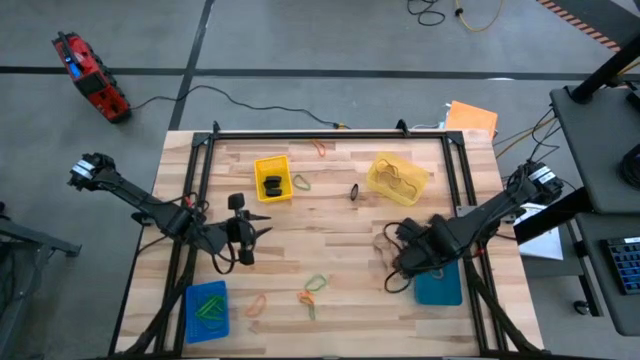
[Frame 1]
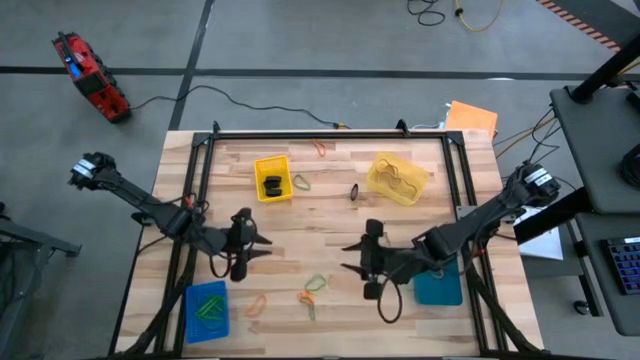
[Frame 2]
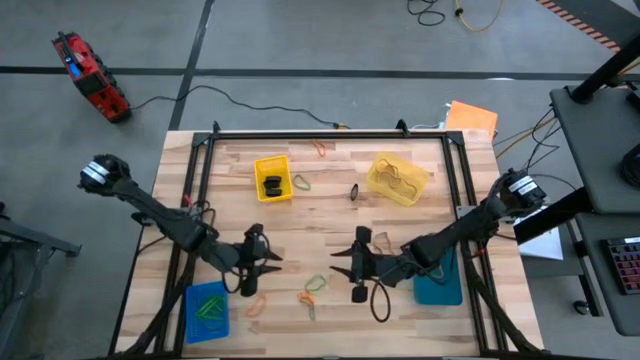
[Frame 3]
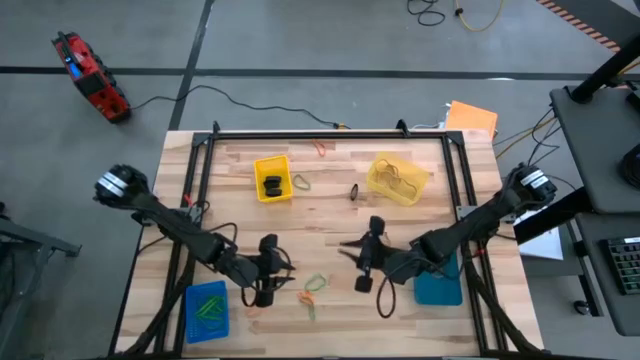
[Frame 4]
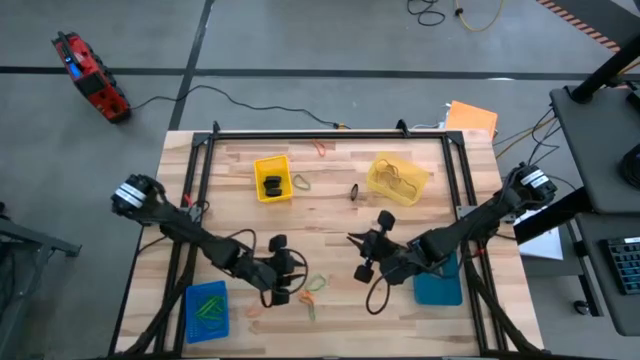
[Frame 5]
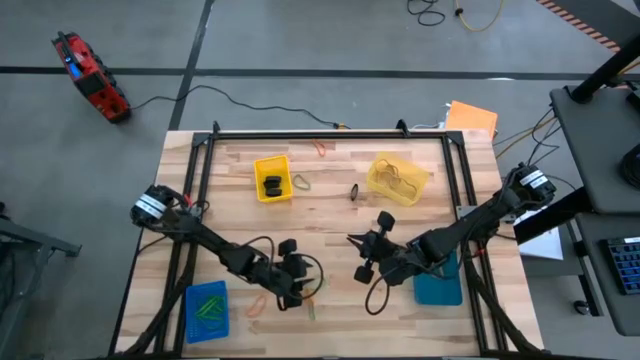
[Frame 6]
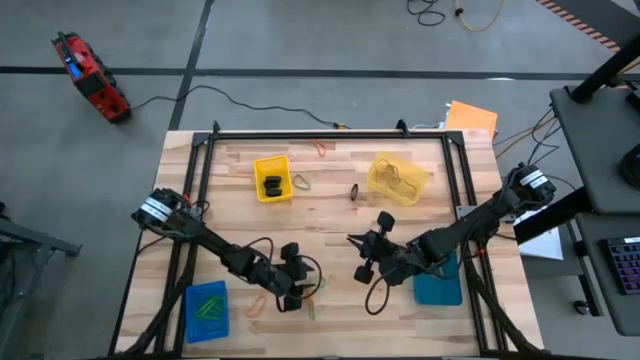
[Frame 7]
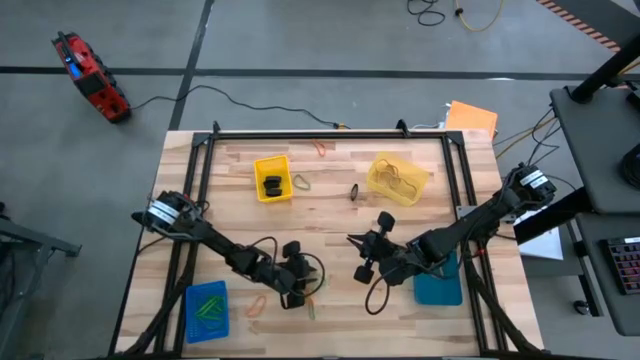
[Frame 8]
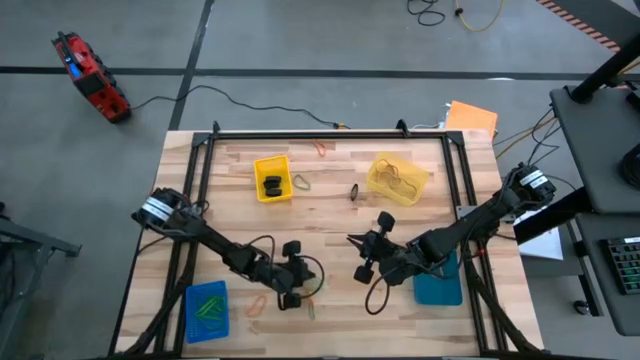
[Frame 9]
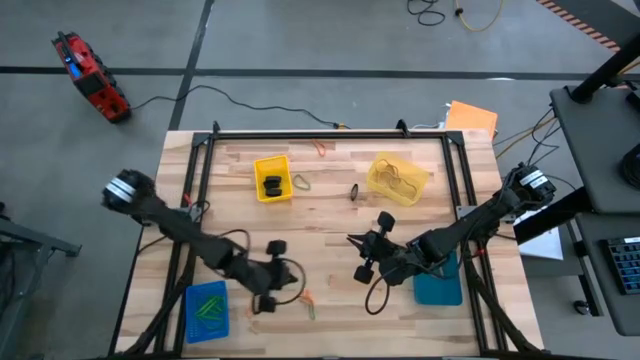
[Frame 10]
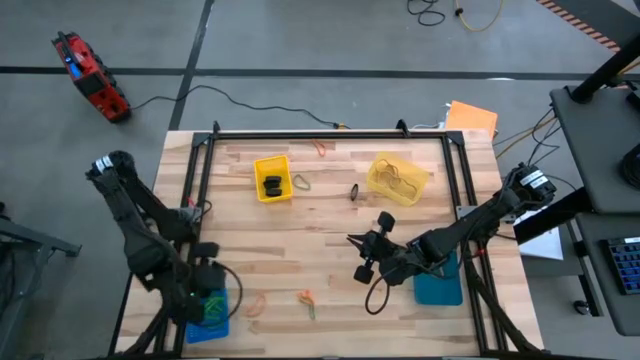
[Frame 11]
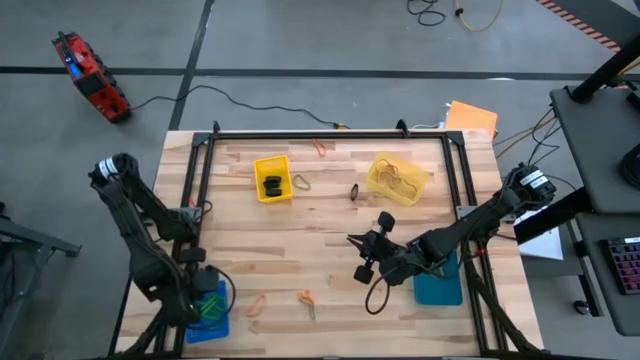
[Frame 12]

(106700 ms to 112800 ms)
Task: Sort rubber bands into baskets
Put the green rubber band into the left blue bin

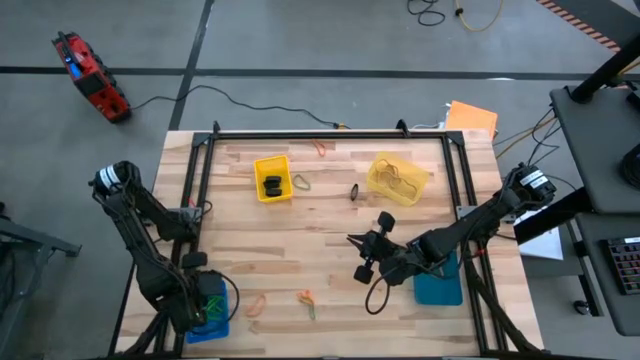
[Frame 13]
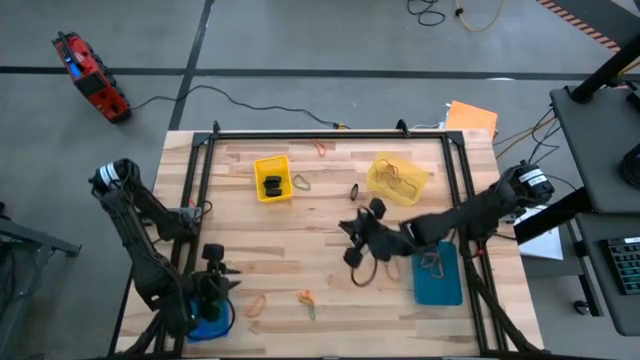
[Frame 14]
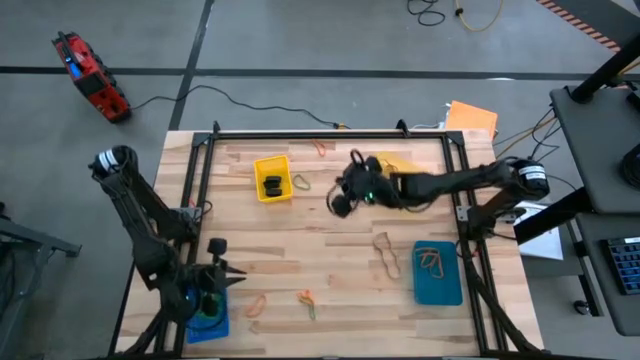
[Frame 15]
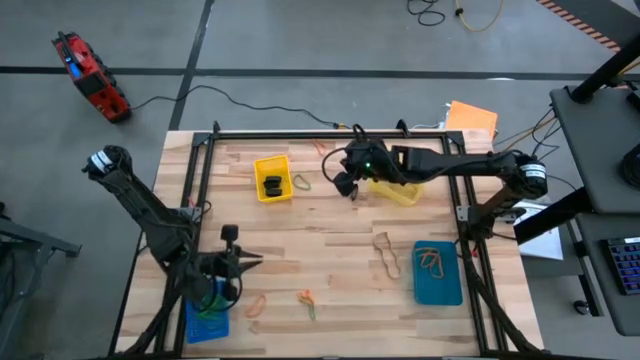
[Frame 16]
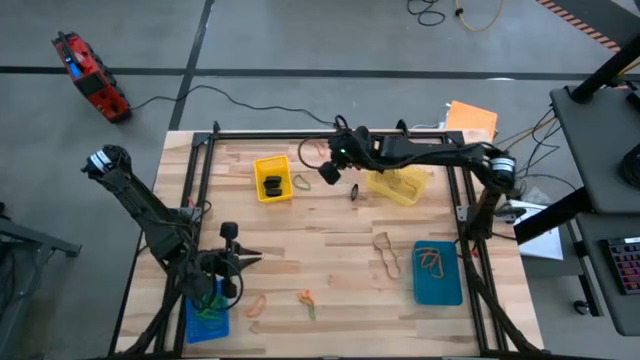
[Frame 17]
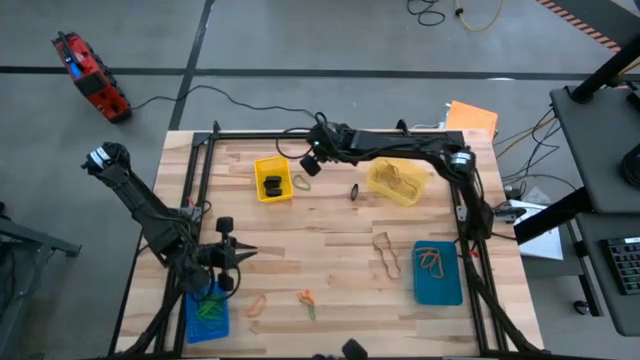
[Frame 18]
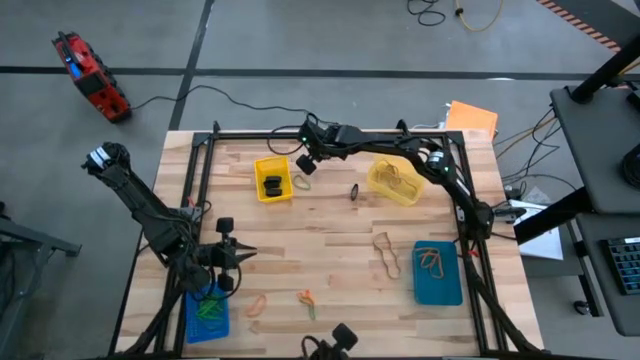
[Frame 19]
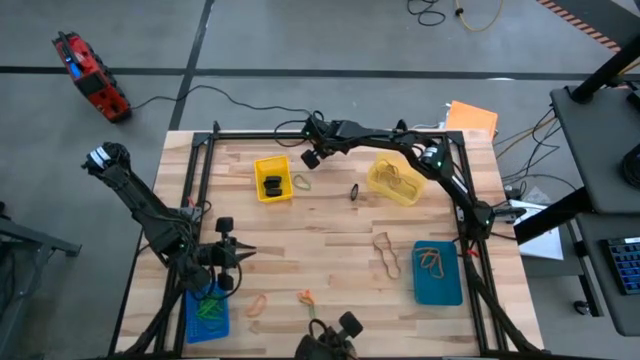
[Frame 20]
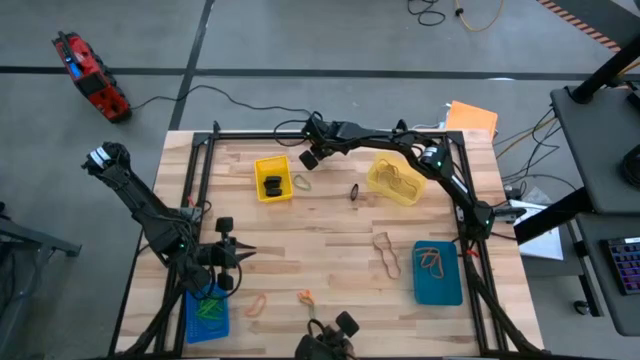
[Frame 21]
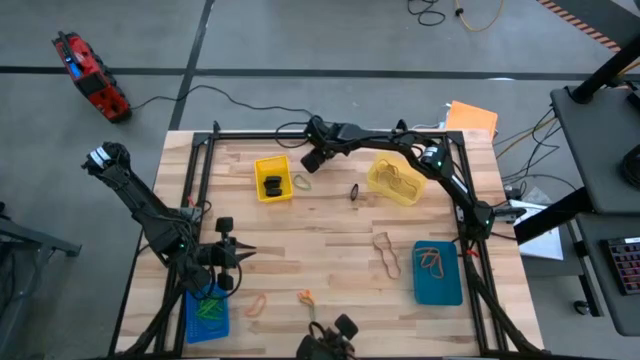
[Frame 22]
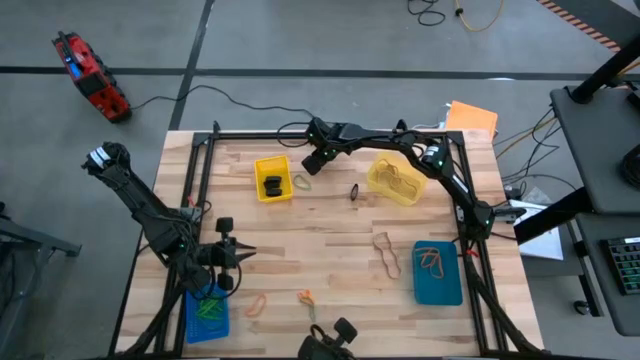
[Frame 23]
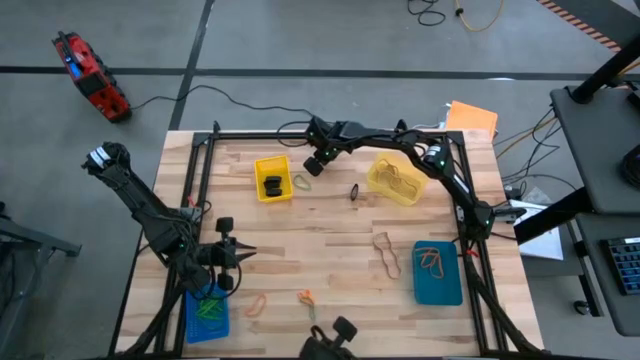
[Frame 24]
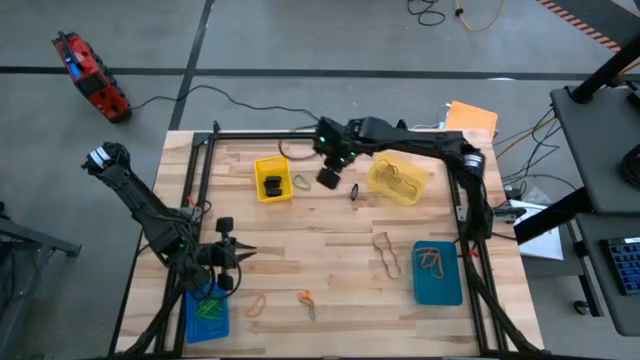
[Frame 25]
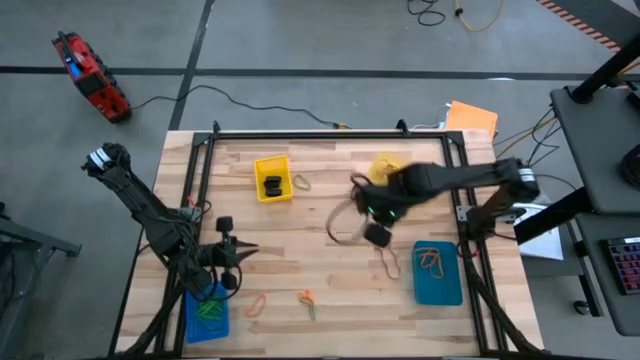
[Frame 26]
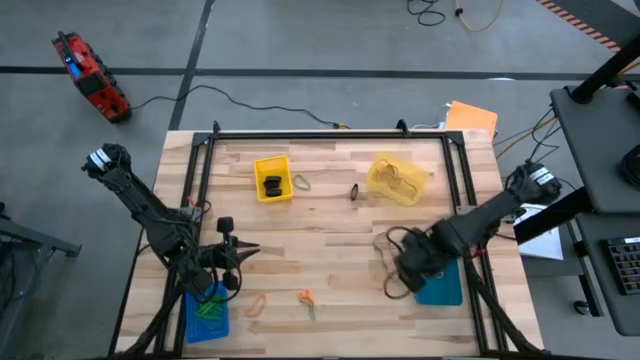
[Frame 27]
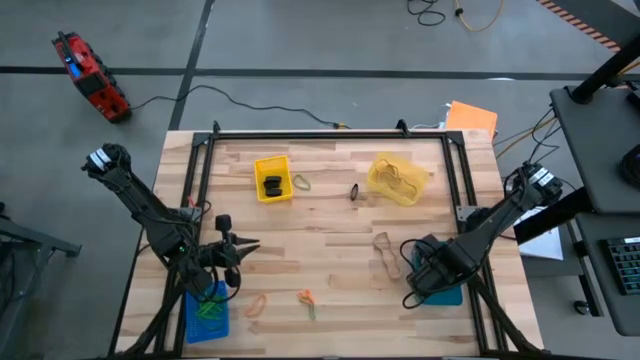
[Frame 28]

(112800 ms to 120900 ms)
Put the orange rubber band into the right blue bin

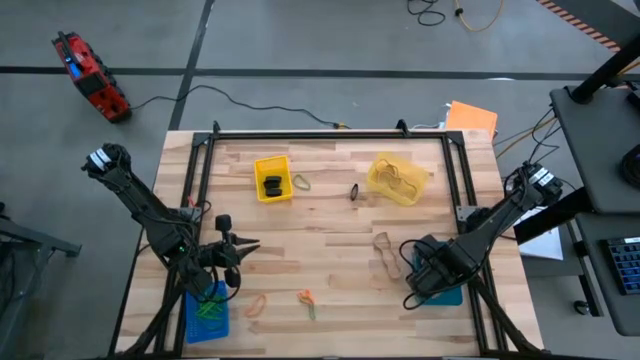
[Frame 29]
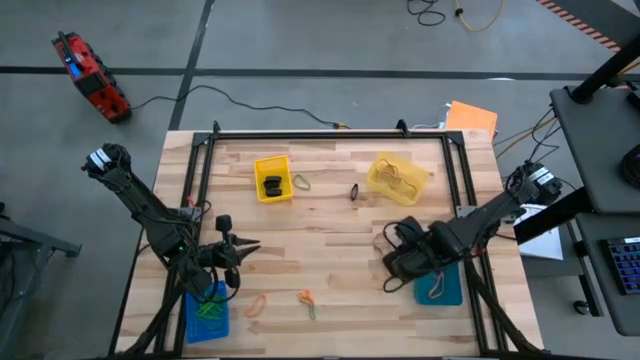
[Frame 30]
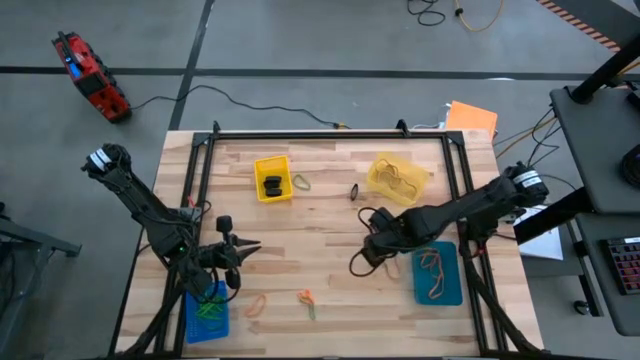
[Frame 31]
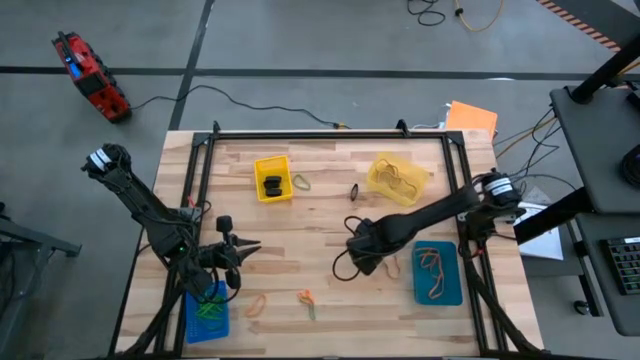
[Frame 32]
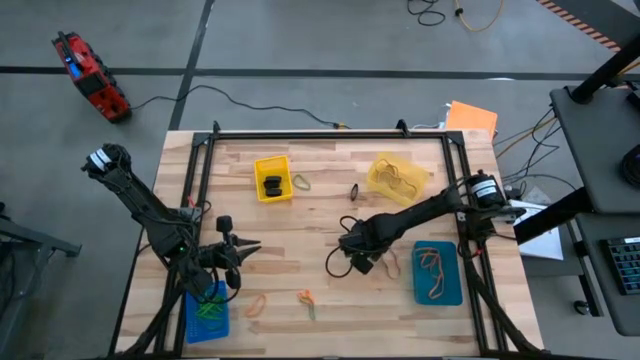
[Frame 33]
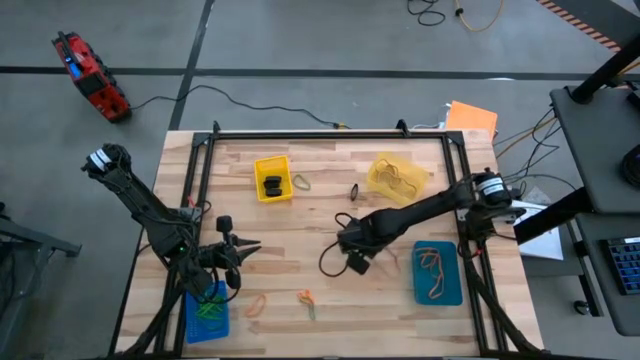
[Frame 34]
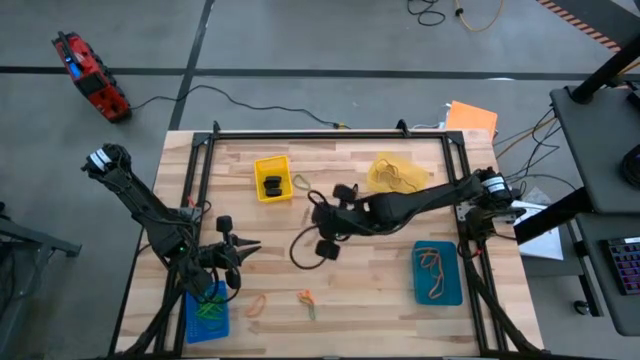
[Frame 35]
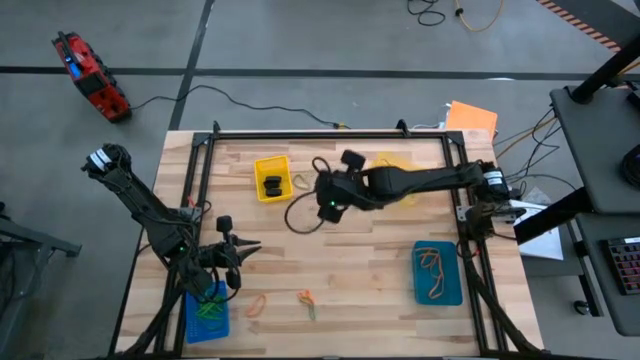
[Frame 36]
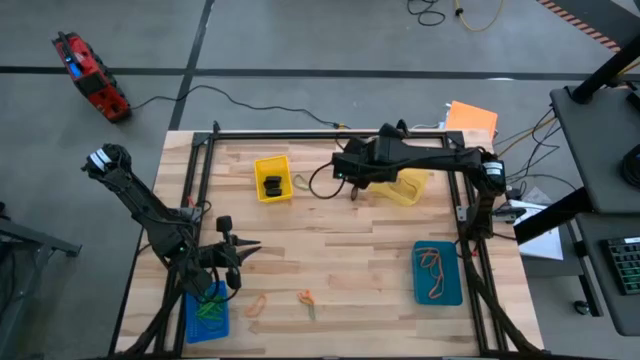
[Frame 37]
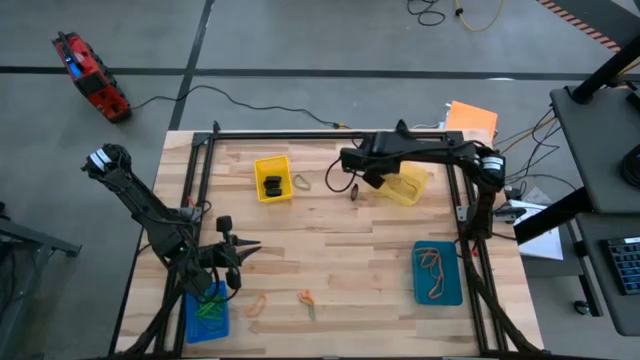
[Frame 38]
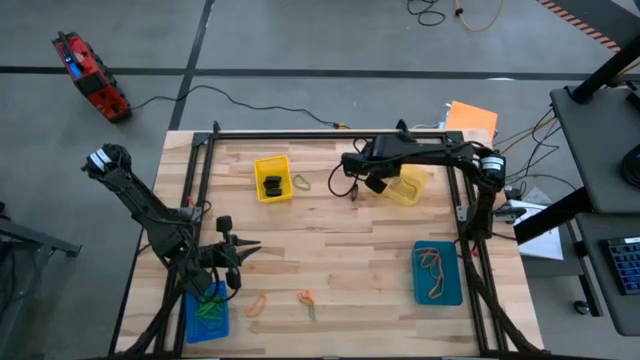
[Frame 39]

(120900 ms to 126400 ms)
Put the brown rubber band into the right yellow bin

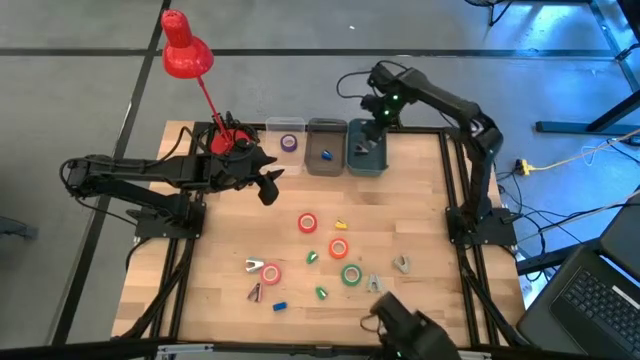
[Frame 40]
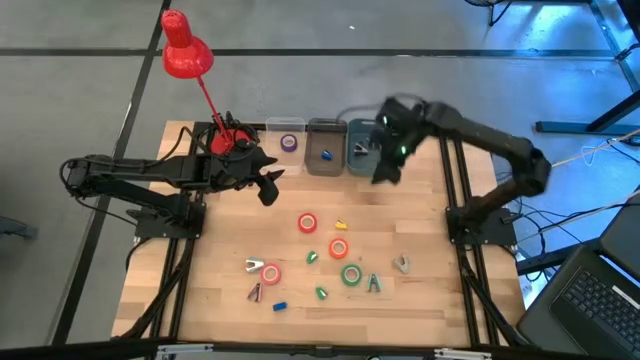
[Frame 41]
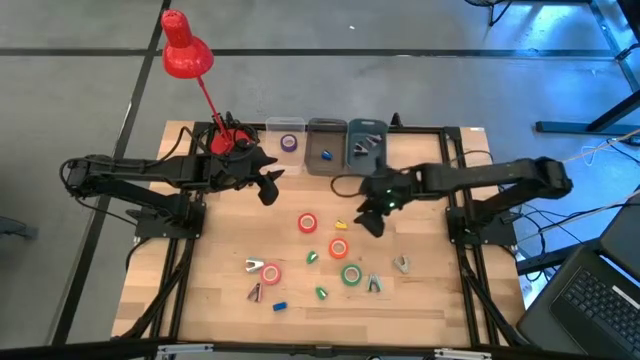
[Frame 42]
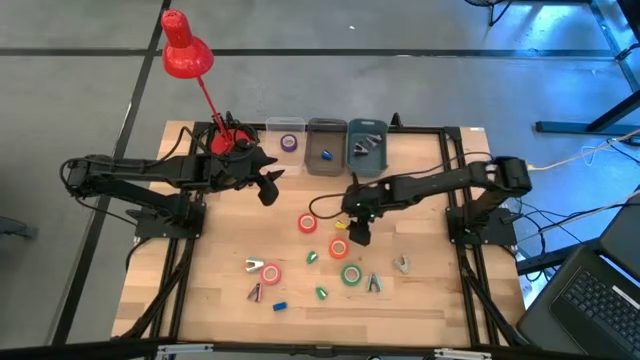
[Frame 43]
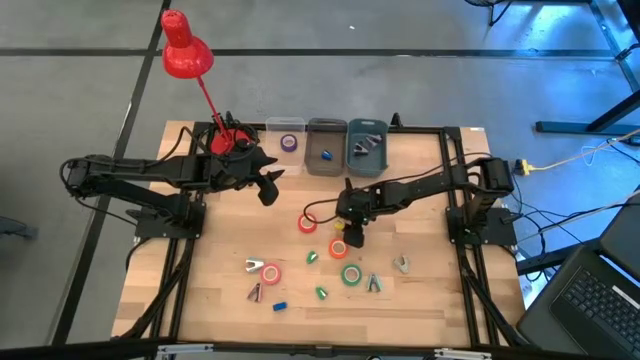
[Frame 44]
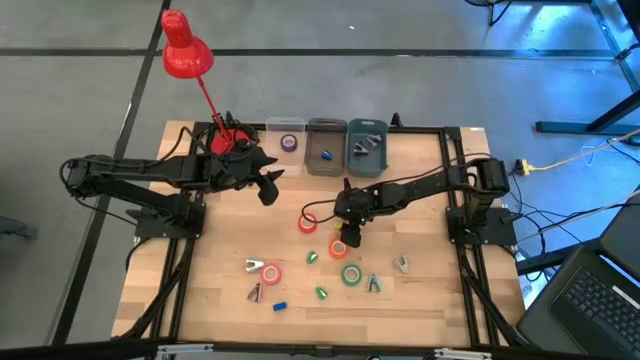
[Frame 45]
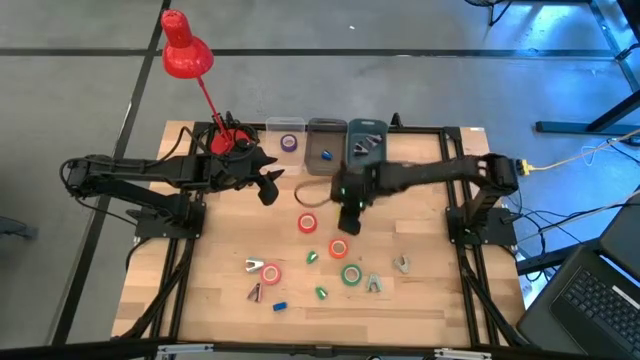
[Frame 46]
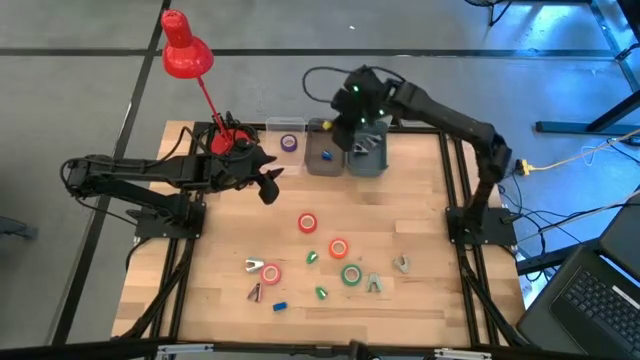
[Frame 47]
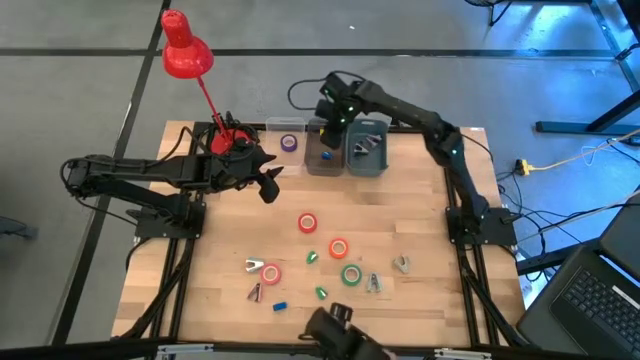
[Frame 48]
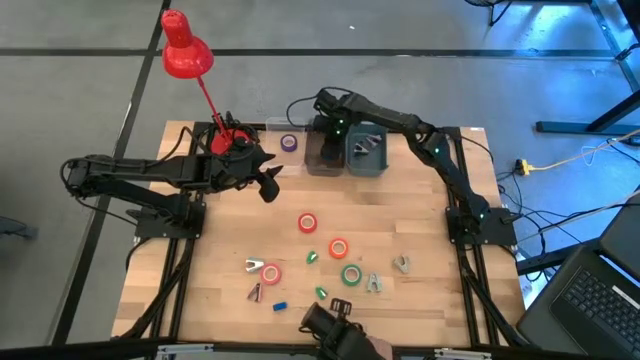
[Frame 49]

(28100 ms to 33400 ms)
Task: Pick and place Stapler, Stapler remover, tape
Put the yellow stapler into the black bin
